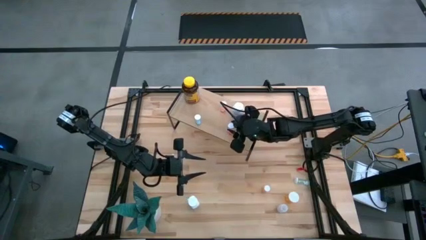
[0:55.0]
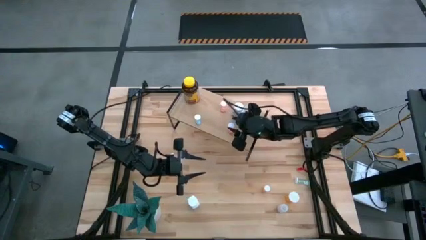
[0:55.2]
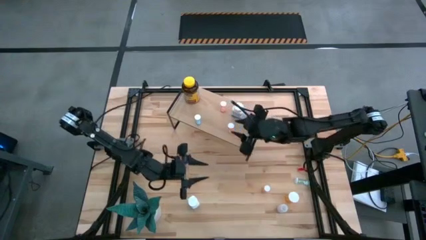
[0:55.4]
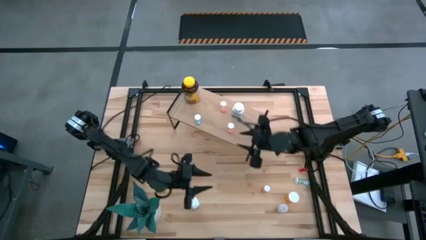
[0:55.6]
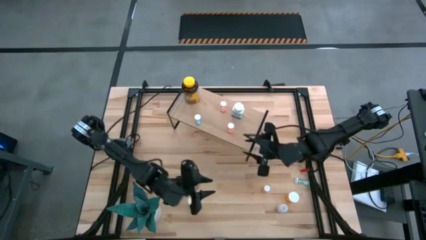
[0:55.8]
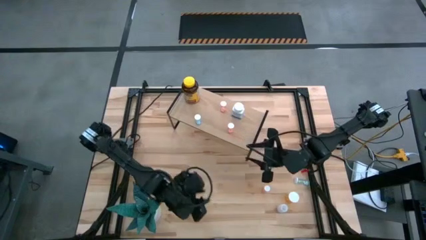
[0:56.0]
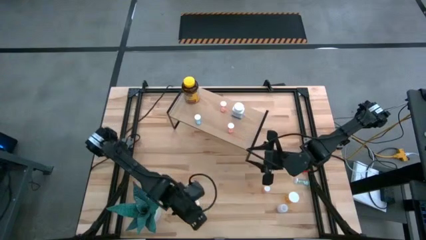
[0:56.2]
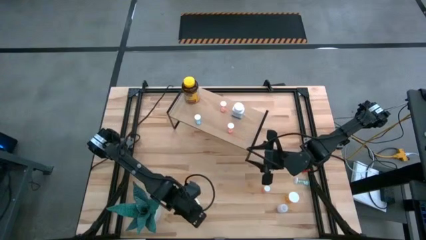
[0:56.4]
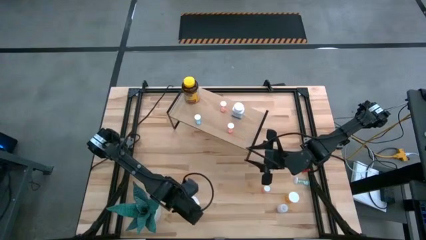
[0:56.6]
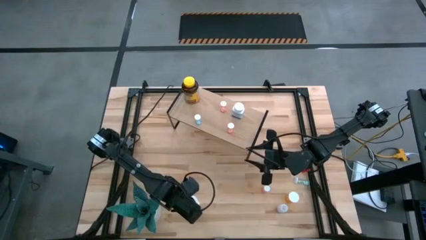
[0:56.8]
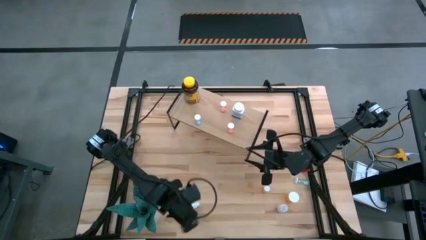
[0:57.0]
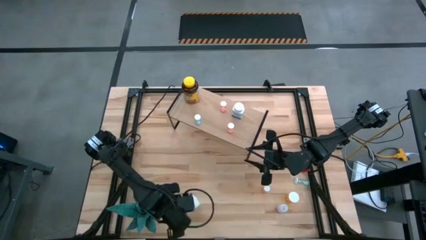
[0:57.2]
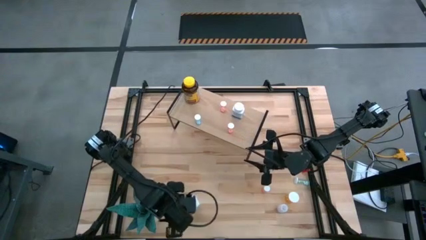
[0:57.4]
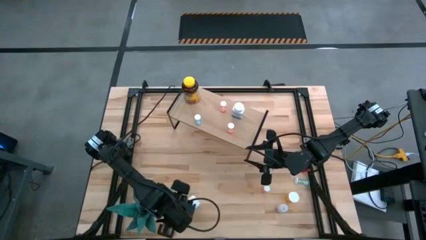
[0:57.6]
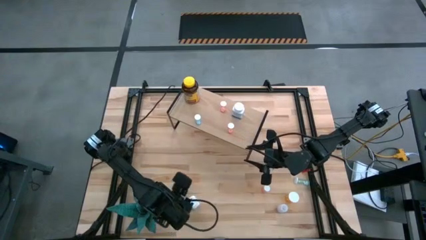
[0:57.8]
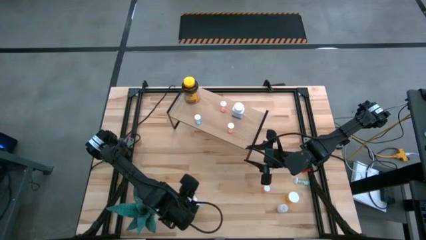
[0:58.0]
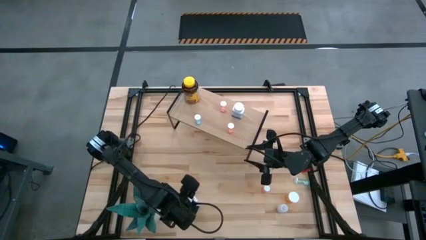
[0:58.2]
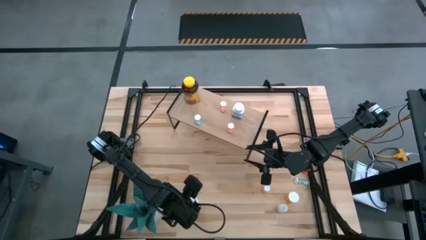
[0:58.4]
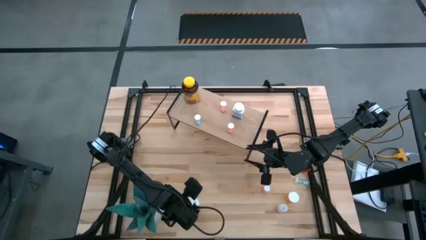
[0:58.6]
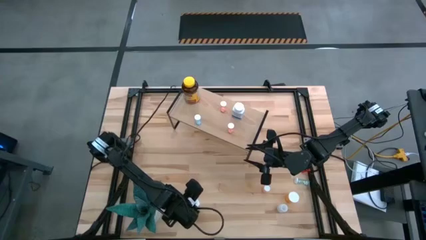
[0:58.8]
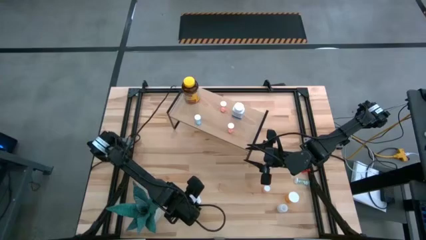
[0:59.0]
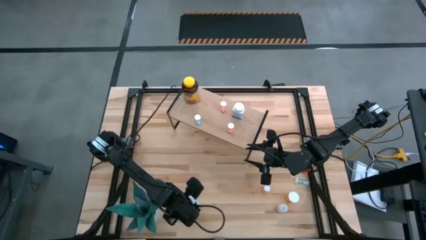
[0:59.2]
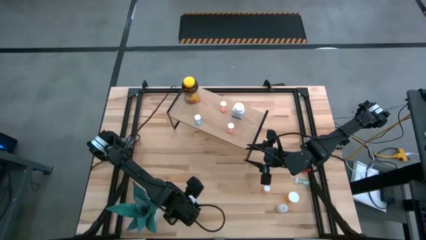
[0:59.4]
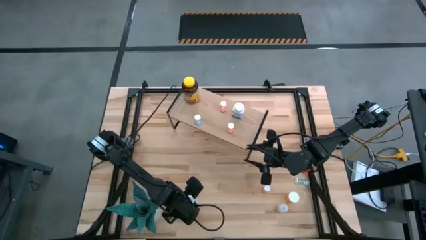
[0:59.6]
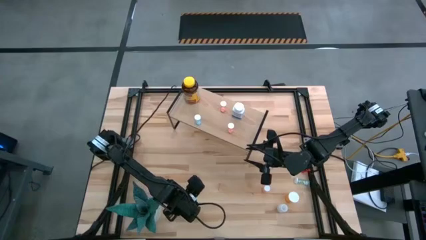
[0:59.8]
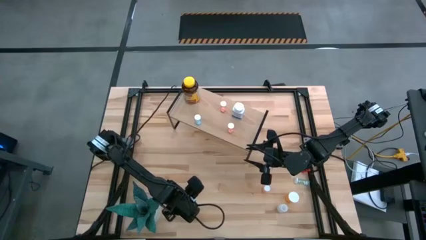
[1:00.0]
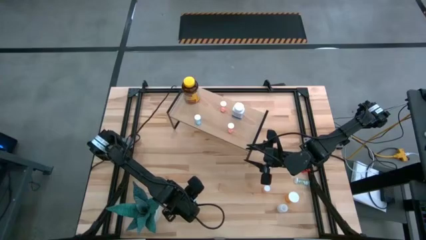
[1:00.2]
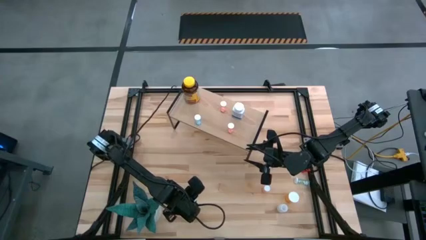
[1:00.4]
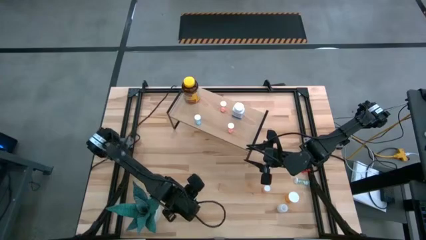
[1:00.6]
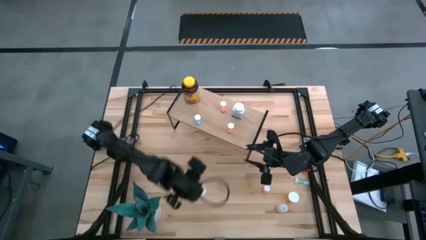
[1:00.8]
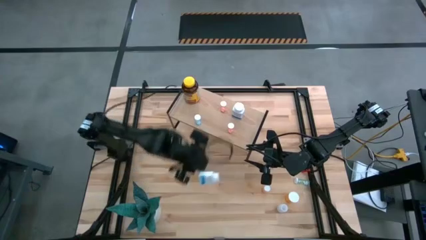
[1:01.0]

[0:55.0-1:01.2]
Task: Pick and place medicine bottles onto shelf by color
Put the white pill bottle on the shelf

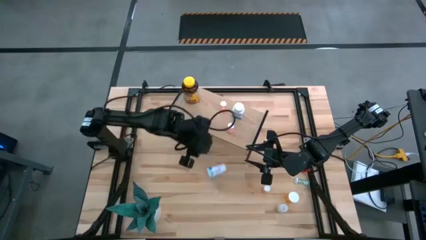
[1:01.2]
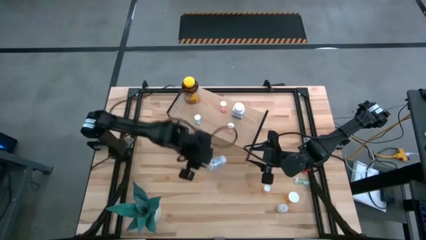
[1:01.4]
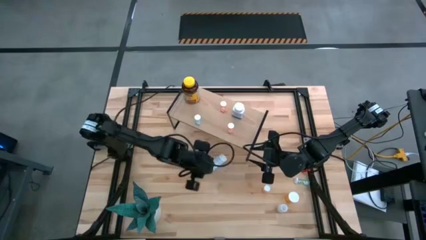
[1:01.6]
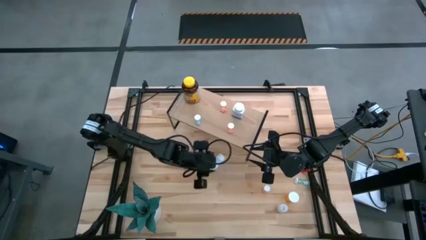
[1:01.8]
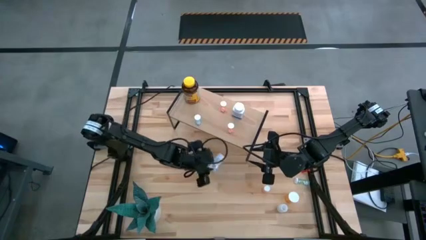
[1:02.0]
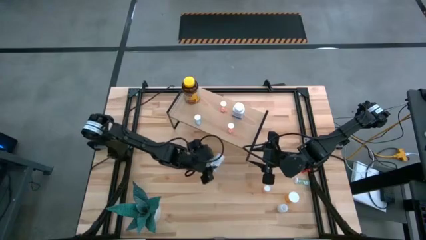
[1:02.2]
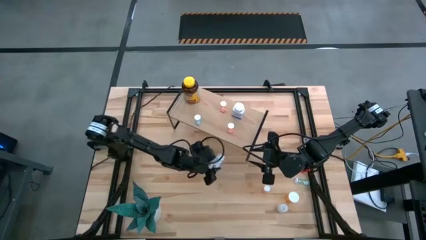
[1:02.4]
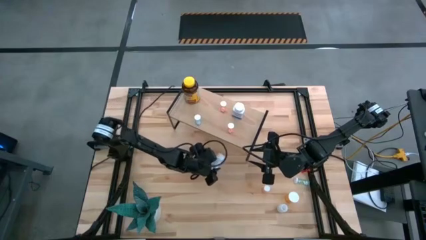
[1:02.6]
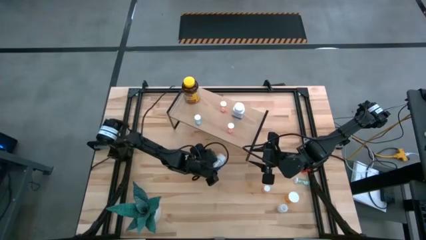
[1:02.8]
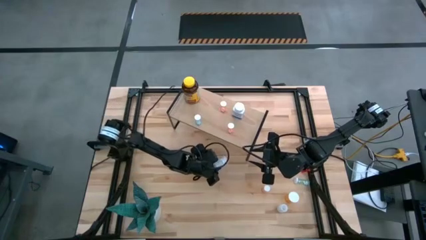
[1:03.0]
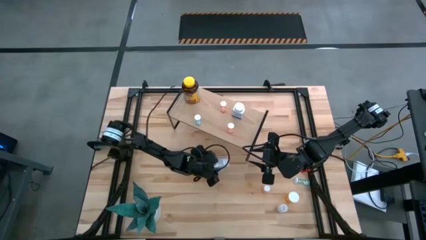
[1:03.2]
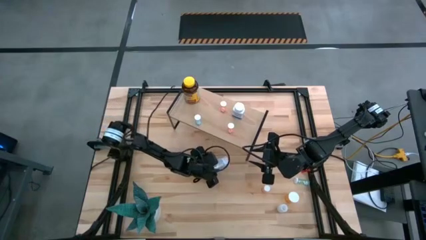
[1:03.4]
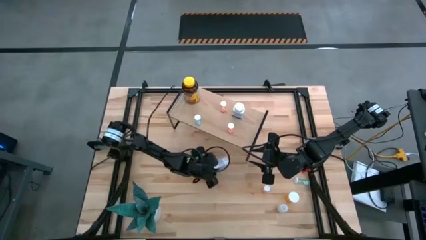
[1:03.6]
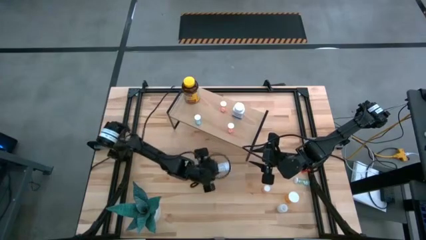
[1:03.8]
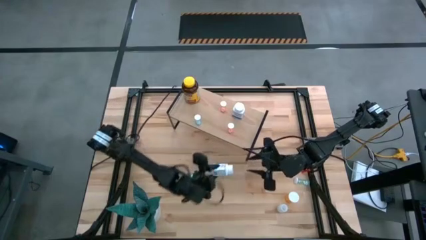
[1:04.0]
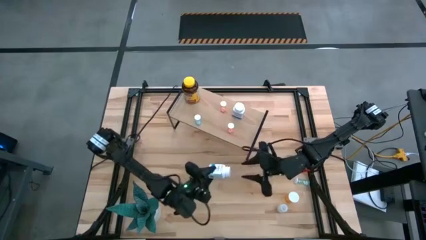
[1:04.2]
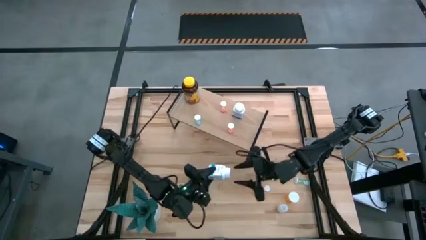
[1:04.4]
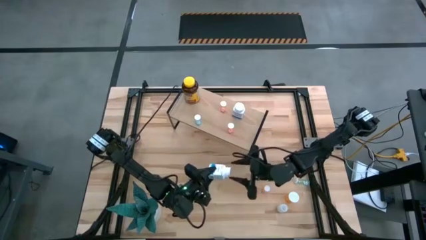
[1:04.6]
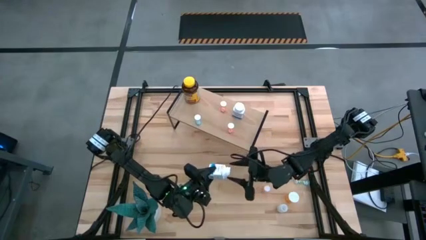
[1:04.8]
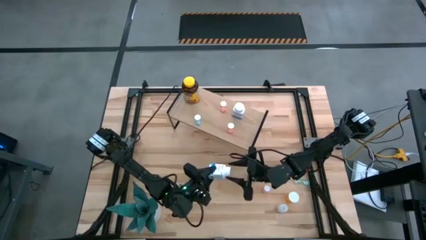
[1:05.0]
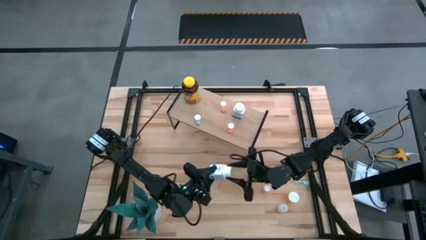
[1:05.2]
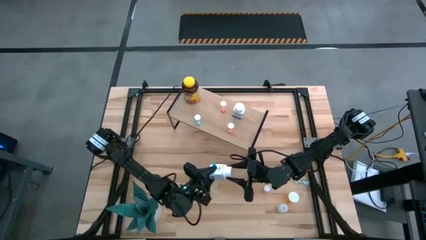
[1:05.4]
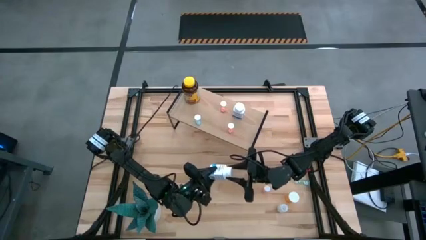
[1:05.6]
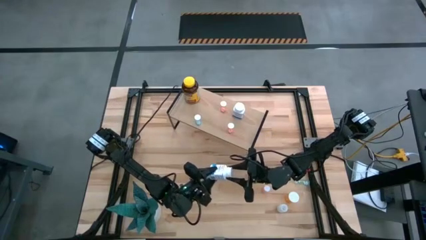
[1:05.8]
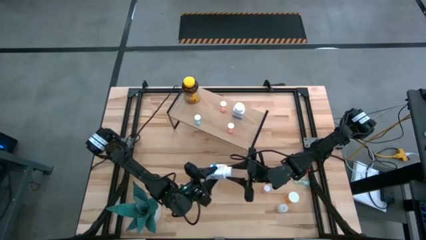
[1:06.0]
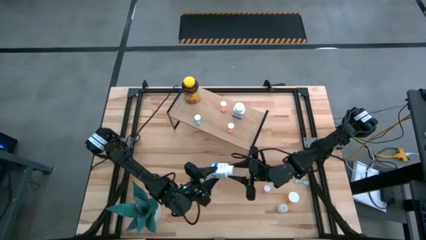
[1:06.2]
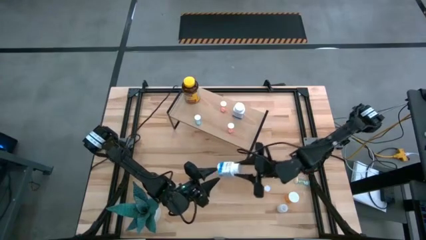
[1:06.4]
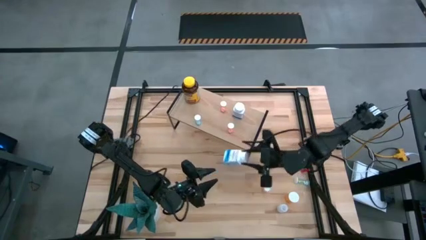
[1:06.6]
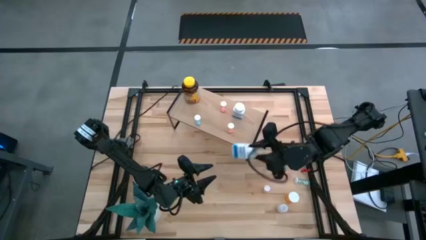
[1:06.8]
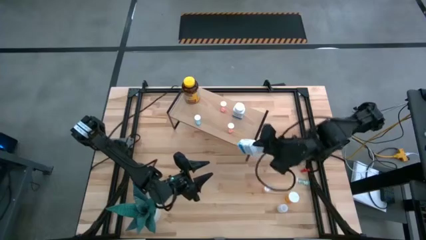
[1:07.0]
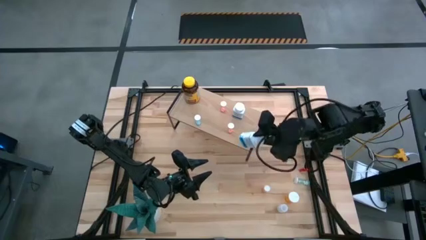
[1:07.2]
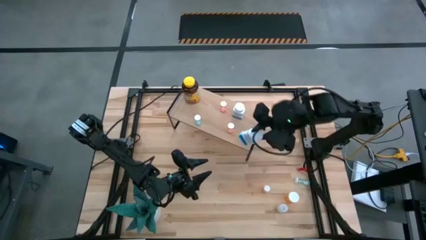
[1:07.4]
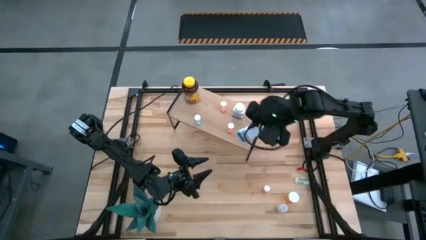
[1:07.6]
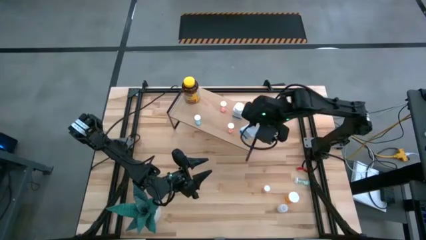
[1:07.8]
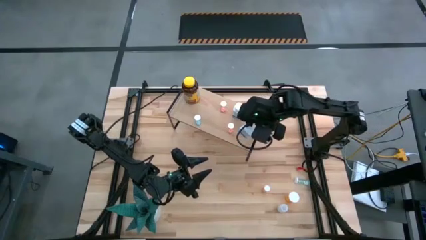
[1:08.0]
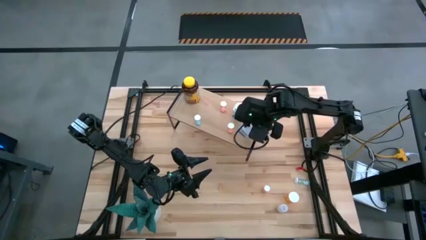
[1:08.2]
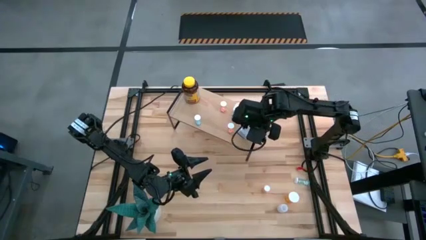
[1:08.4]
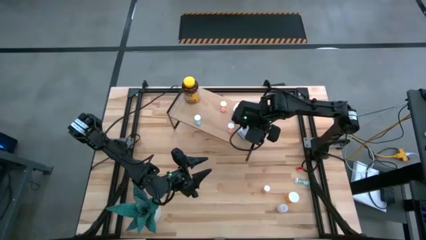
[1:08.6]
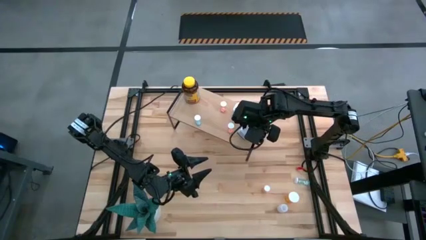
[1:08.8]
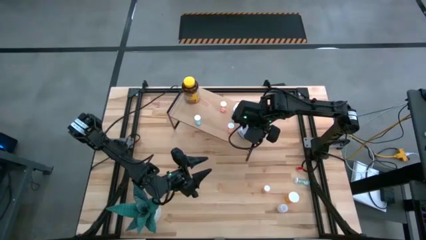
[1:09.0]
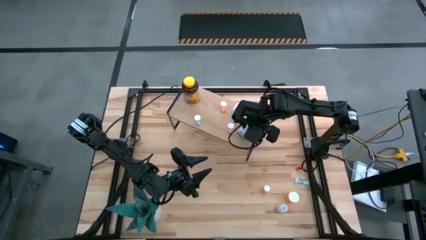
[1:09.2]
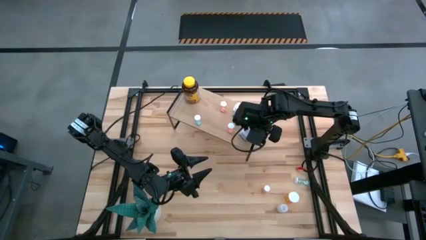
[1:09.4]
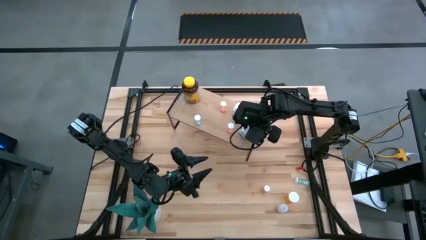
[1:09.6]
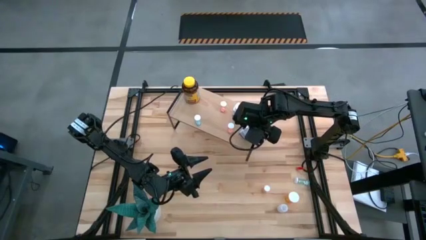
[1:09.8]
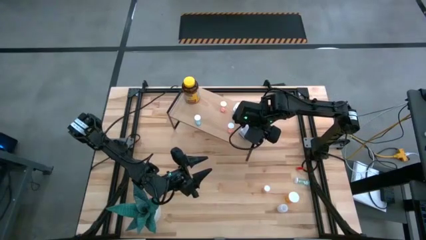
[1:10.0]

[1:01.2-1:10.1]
Put the white pill bottle on the shelf

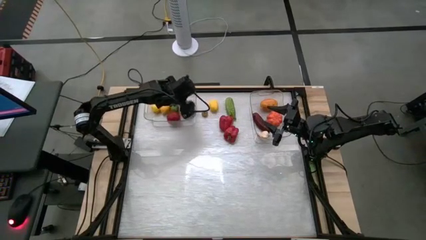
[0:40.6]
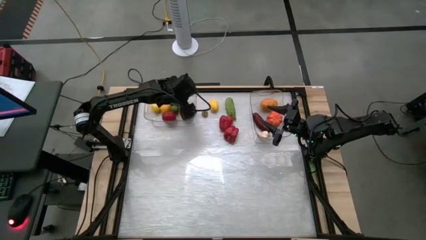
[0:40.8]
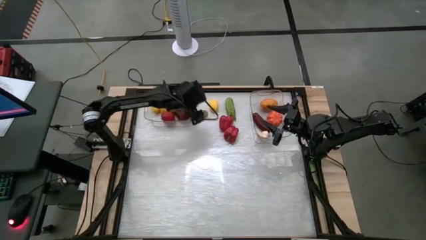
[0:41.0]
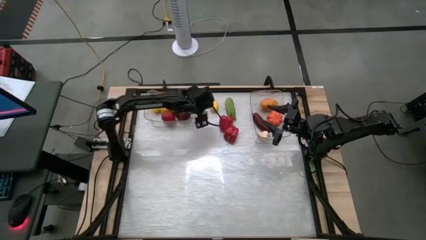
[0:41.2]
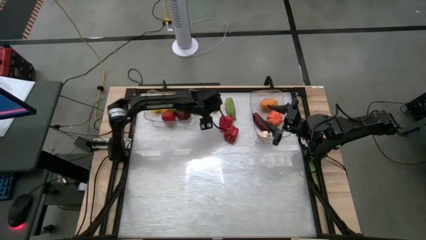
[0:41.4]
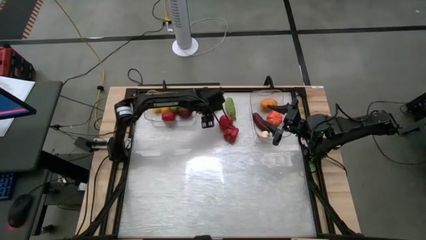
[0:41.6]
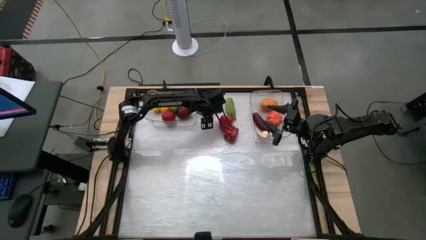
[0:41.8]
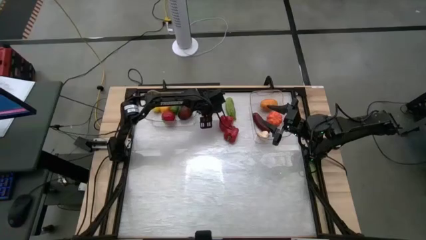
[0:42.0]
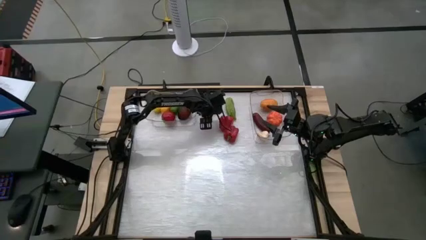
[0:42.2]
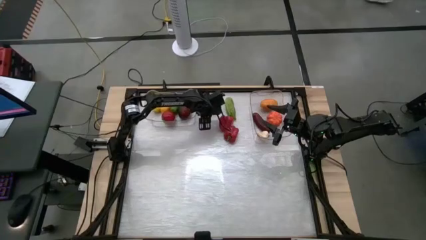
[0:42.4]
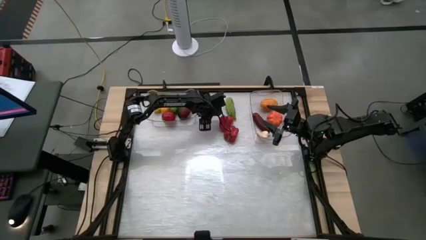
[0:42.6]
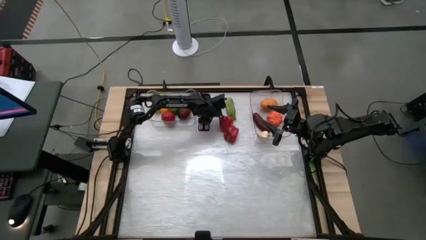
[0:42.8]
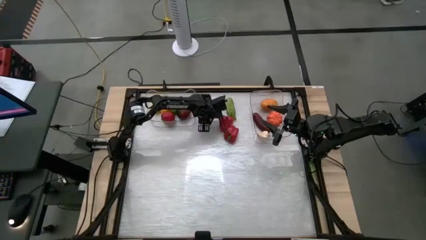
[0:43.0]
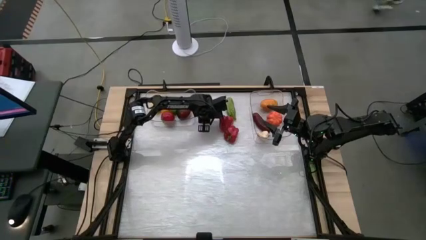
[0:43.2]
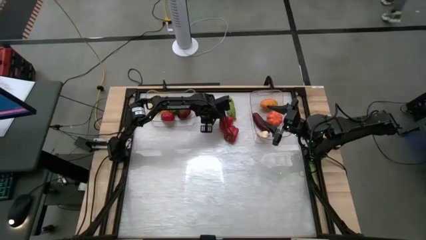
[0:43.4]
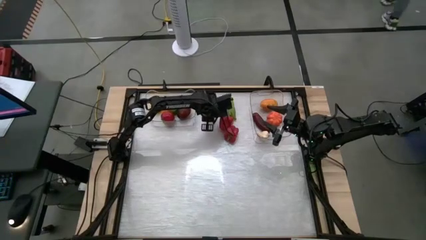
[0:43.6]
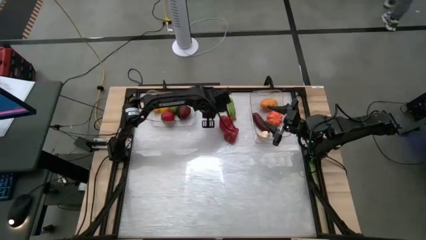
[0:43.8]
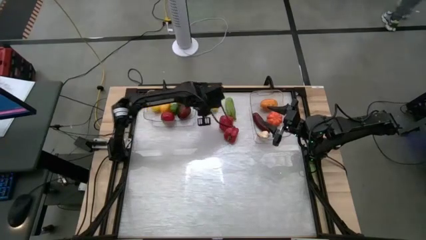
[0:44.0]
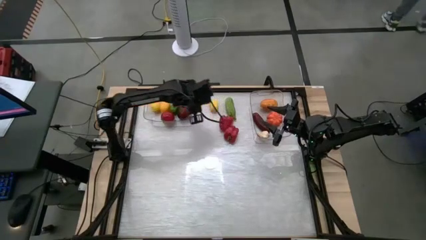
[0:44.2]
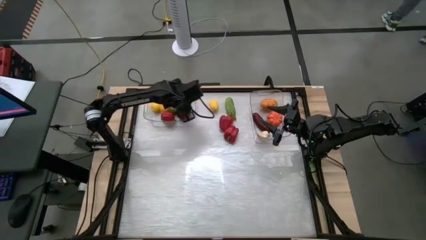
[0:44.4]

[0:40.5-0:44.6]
Task: Sort produce into baskets
Put the orange persimmon into the left transparent bin
